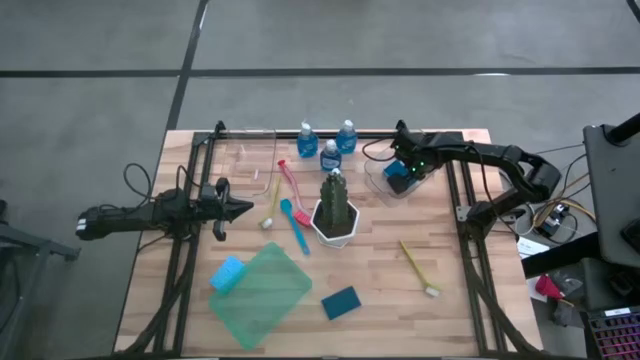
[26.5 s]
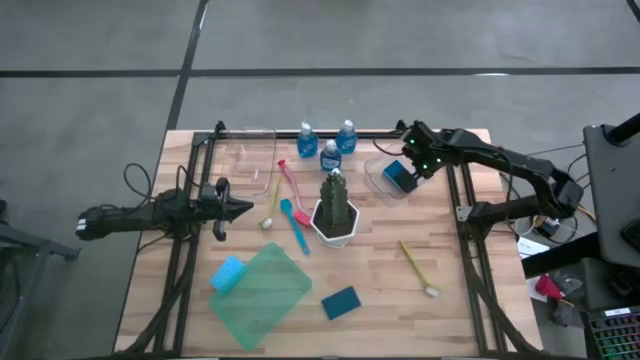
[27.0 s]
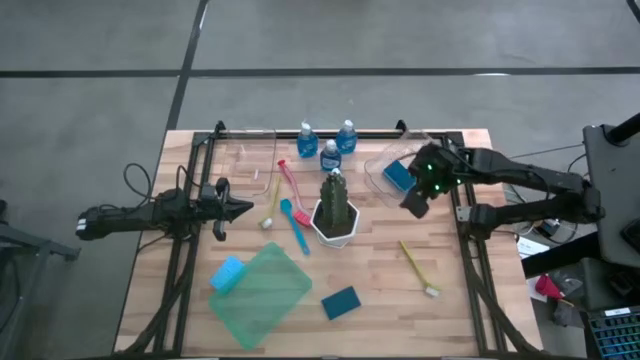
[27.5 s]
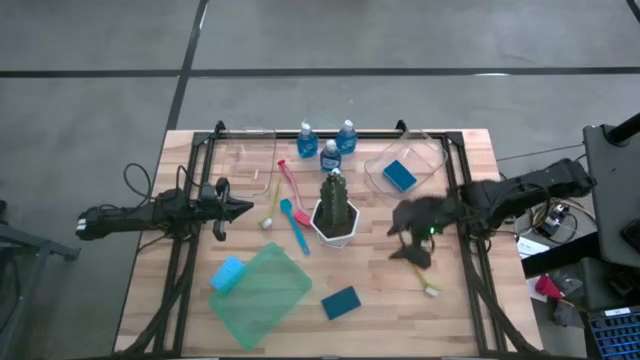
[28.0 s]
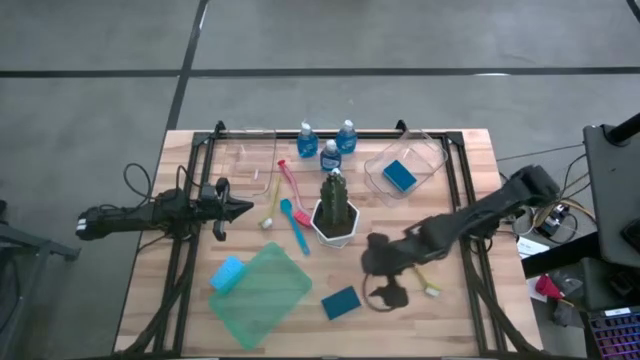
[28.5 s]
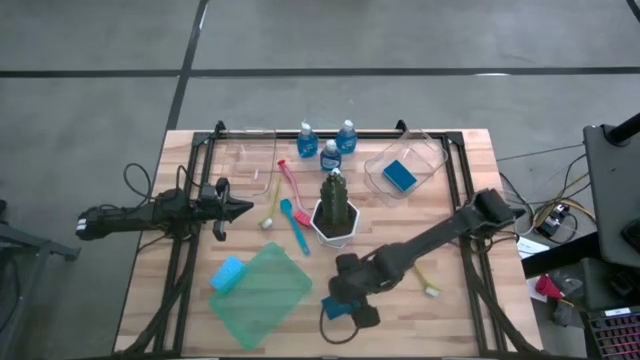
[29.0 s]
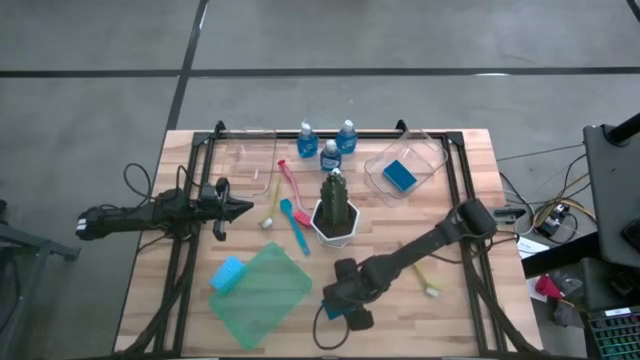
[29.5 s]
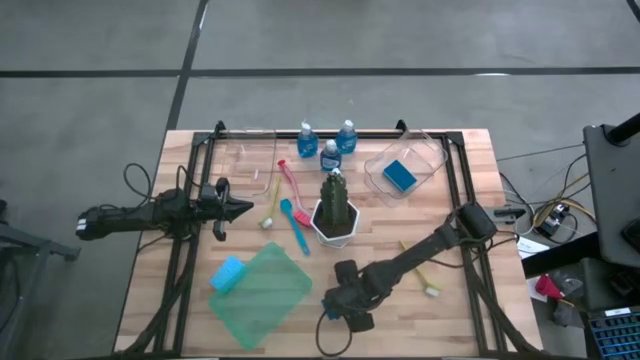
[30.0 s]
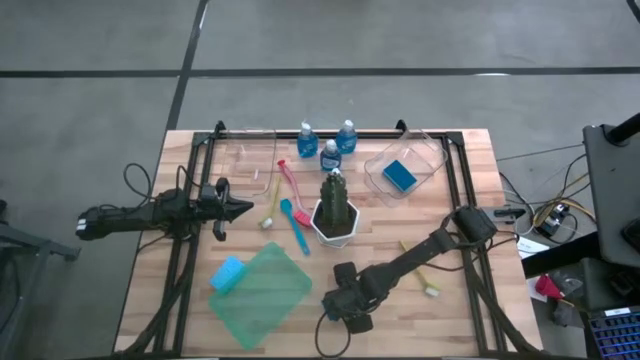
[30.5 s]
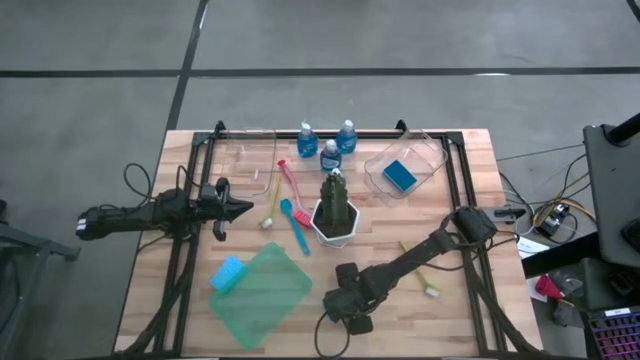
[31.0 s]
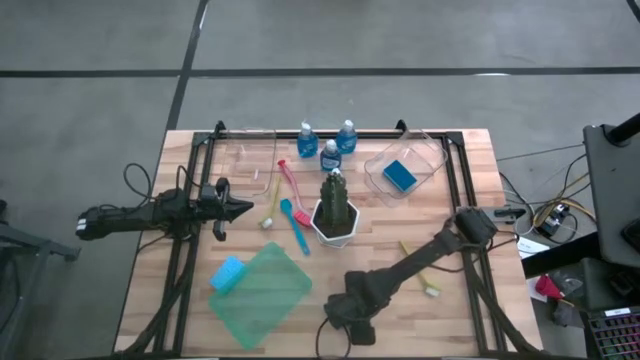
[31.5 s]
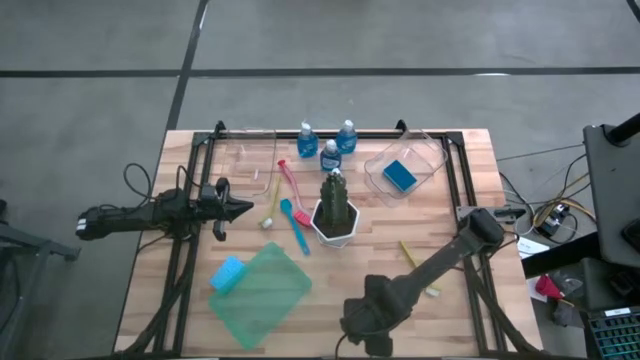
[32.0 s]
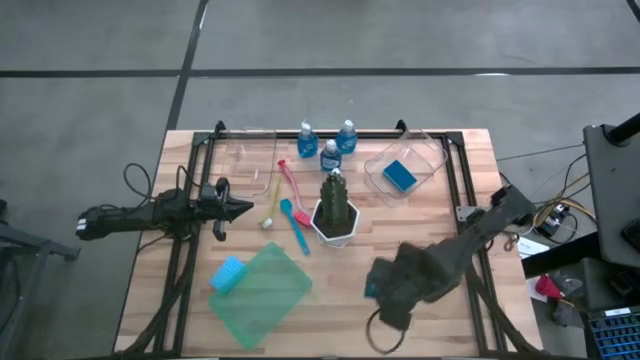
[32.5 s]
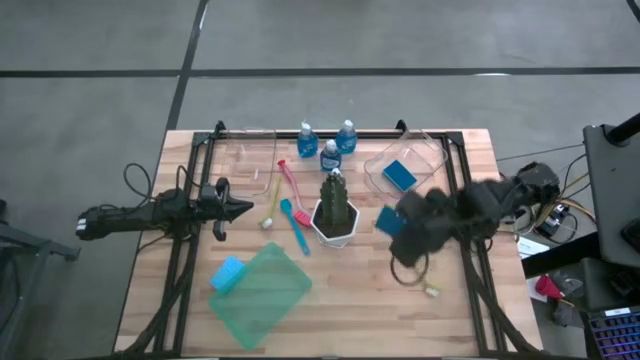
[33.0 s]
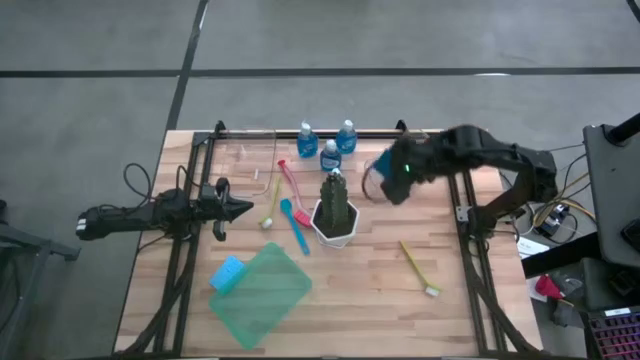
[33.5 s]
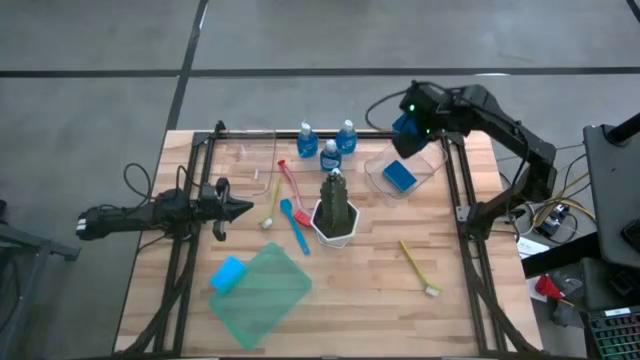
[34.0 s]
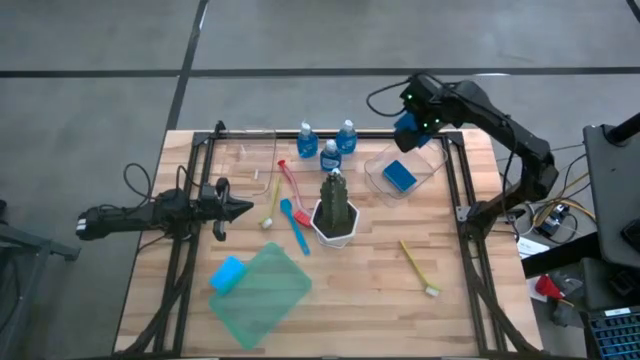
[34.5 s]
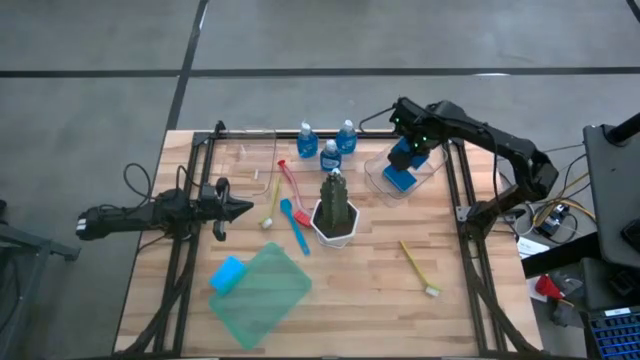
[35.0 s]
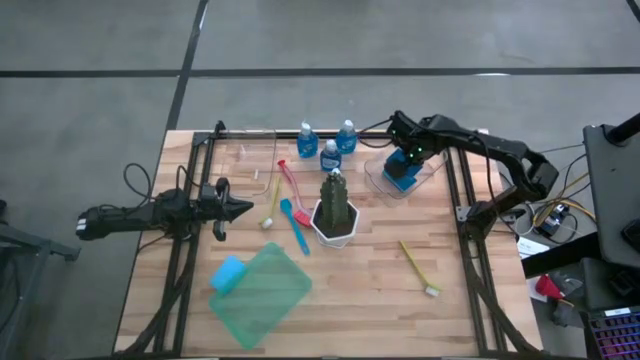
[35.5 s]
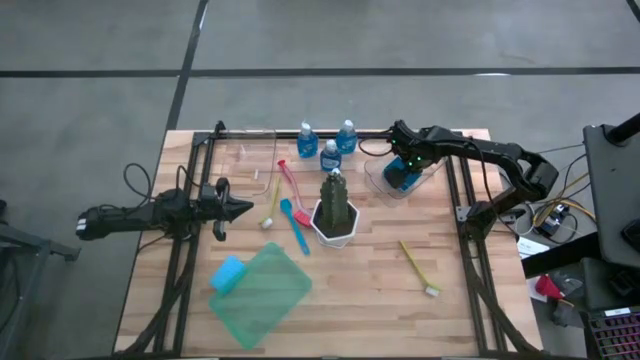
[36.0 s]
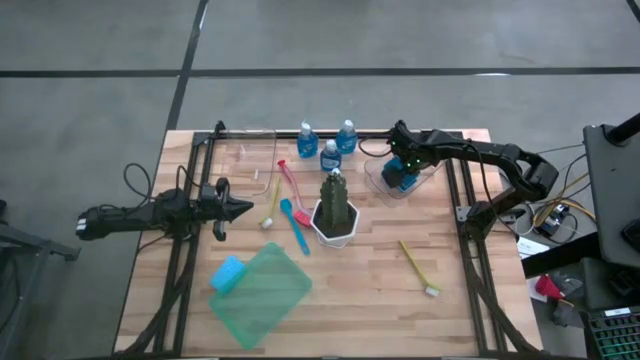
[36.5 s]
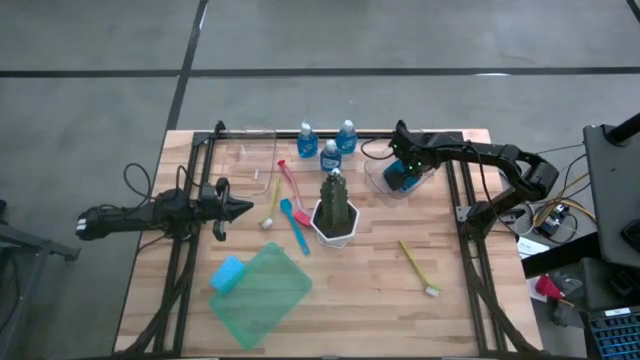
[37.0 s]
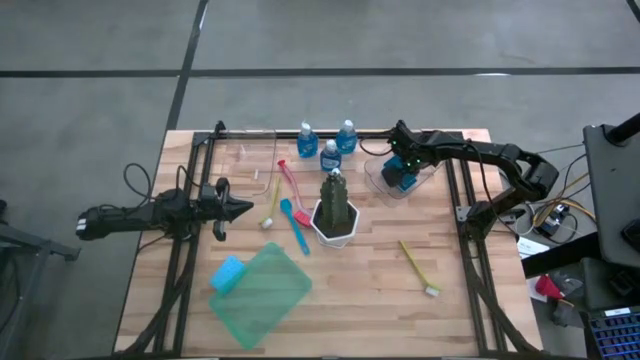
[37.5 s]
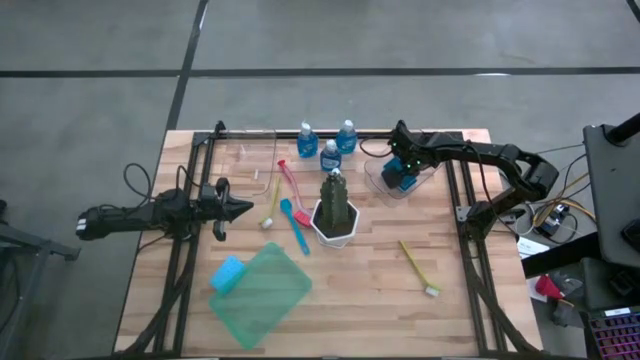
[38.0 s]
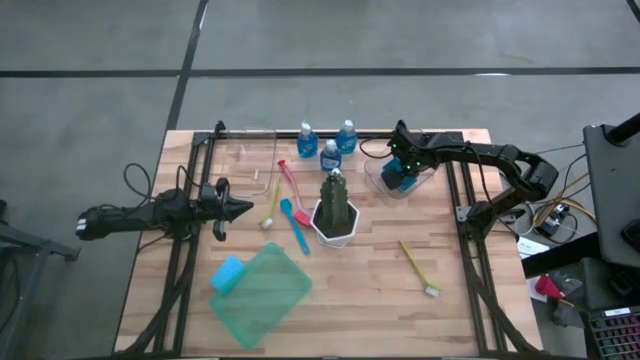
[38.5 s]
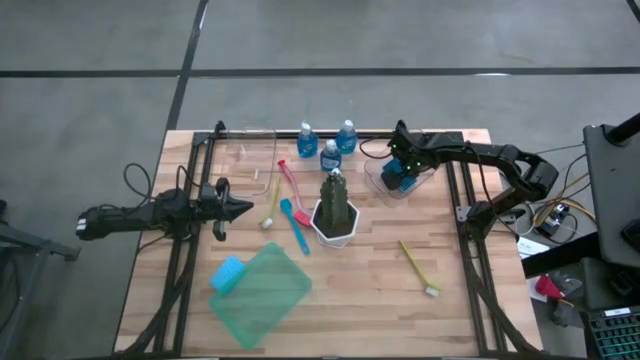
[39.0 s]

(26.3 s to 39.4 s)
Task: Pick & Place Kitchen Sink Supplies
Put the blue sponge into the right transparent bin

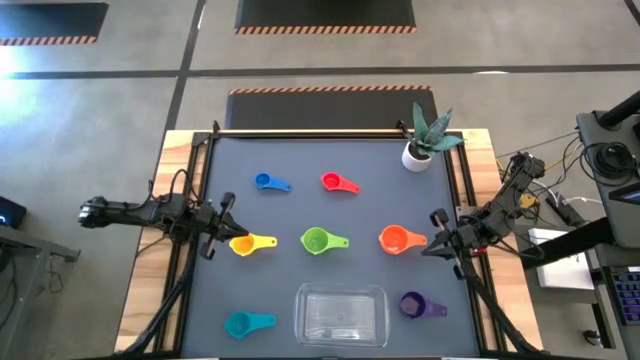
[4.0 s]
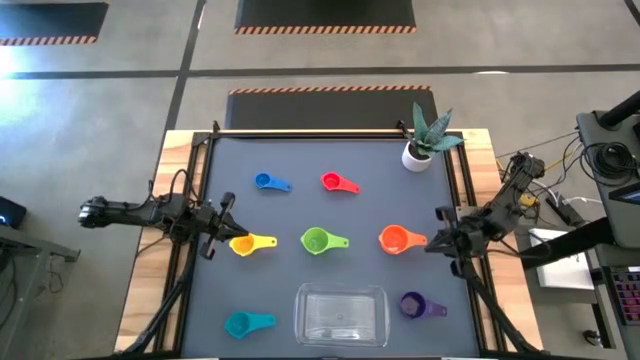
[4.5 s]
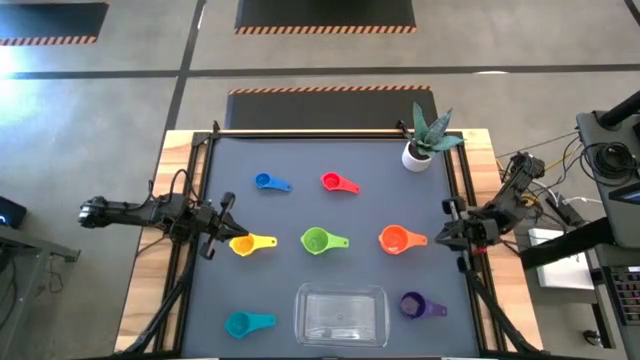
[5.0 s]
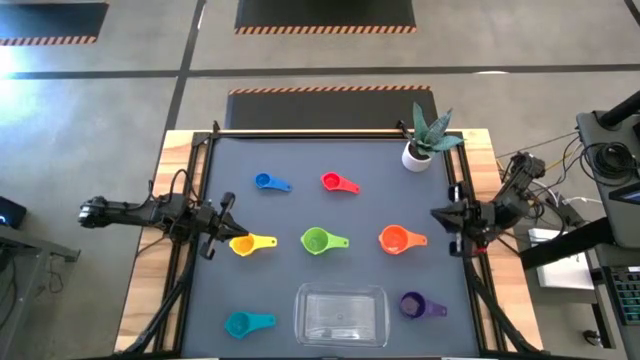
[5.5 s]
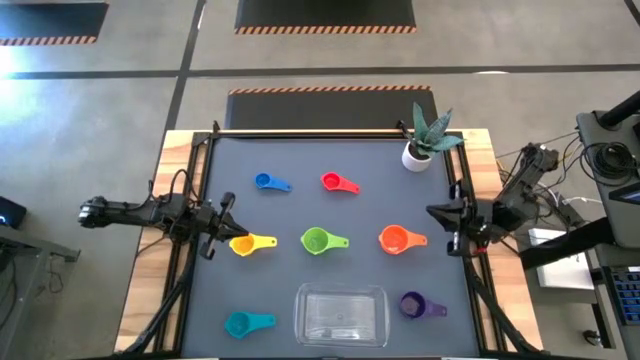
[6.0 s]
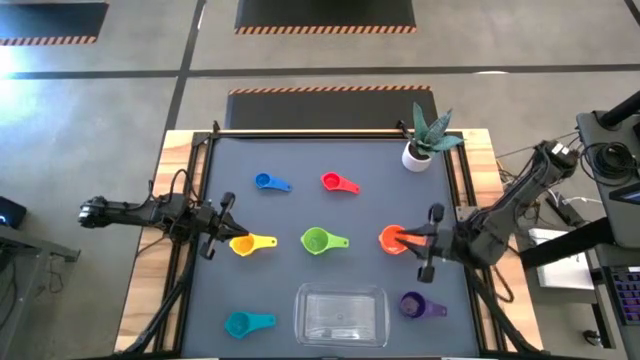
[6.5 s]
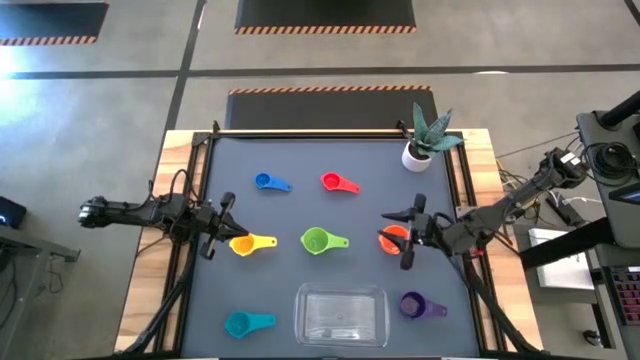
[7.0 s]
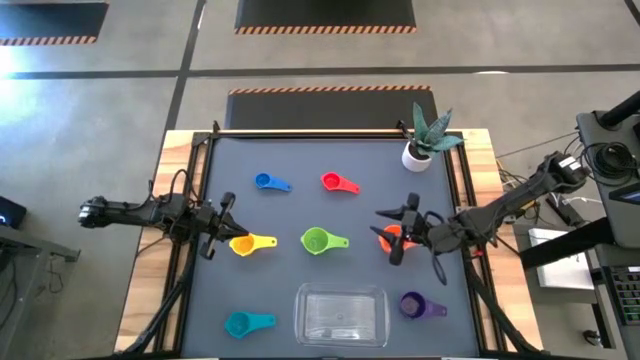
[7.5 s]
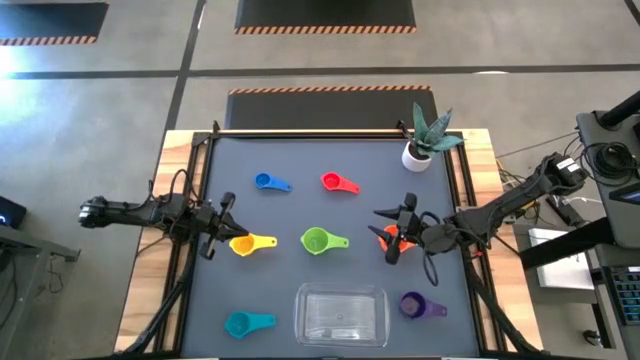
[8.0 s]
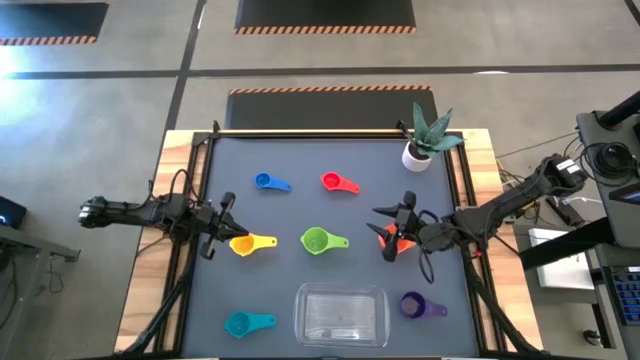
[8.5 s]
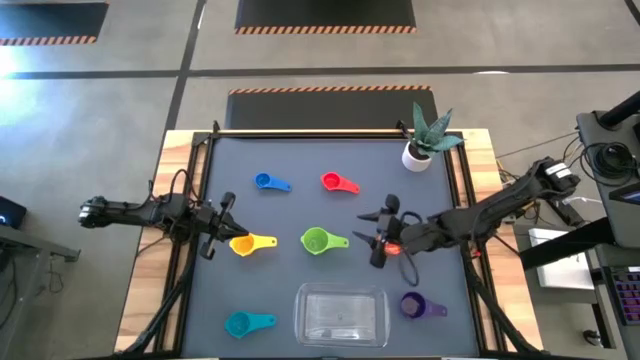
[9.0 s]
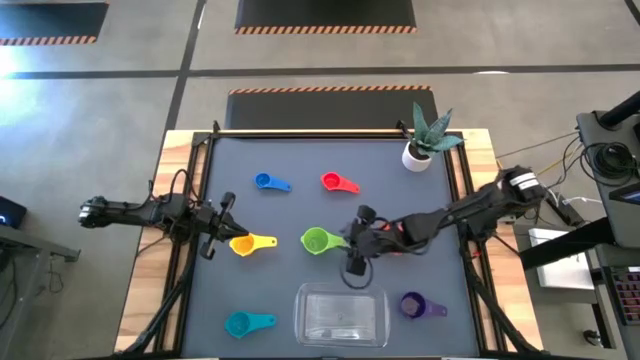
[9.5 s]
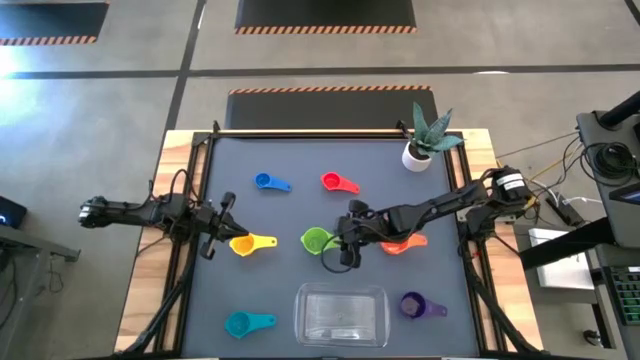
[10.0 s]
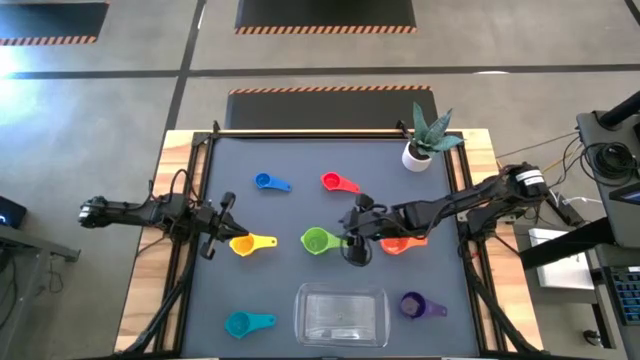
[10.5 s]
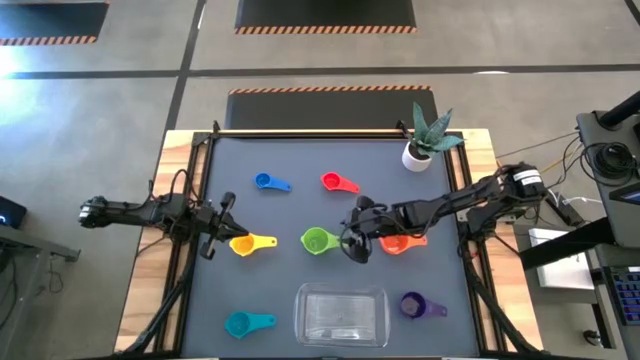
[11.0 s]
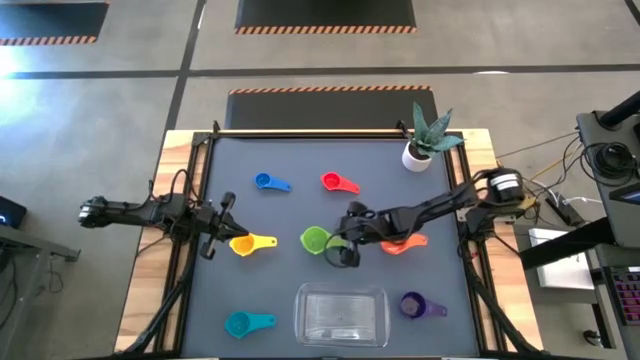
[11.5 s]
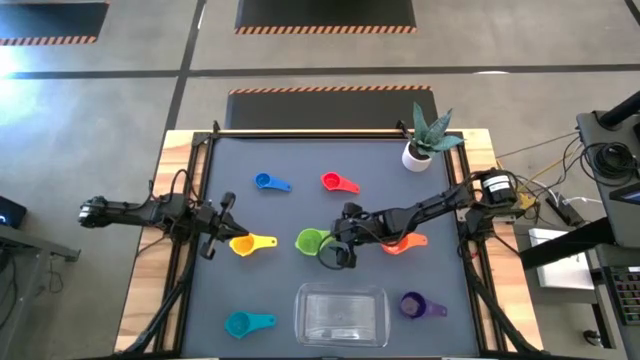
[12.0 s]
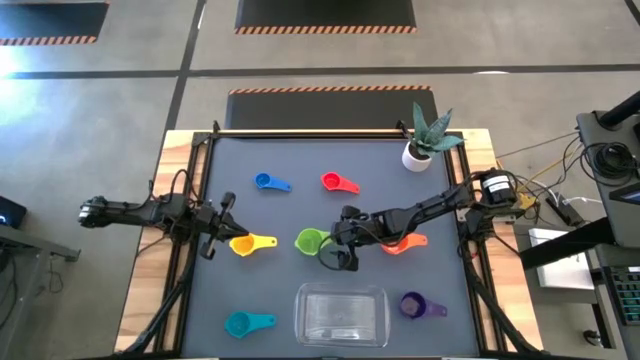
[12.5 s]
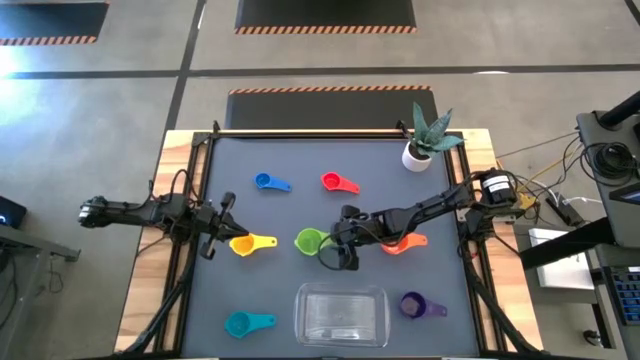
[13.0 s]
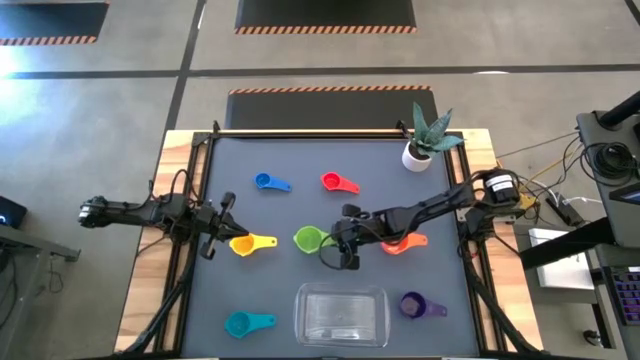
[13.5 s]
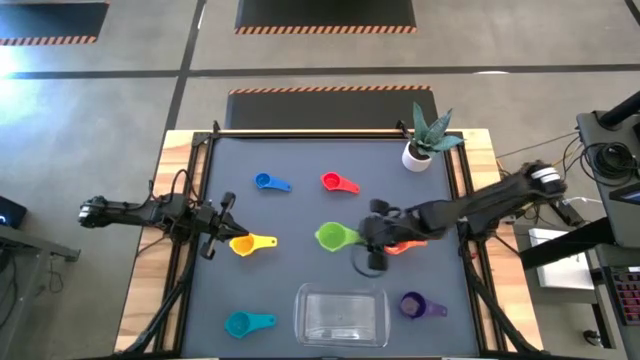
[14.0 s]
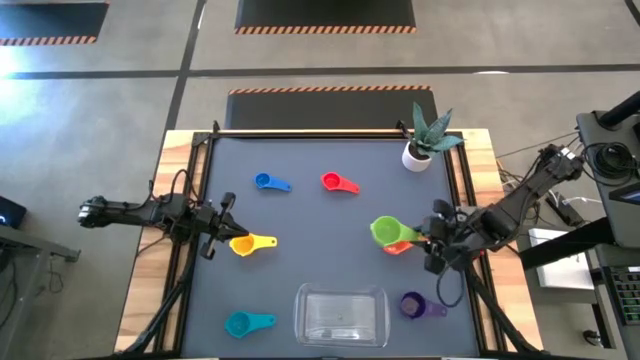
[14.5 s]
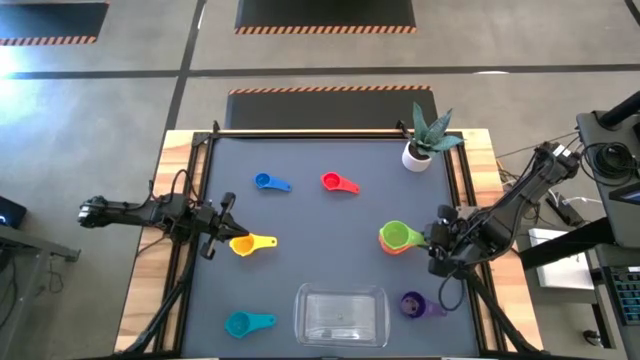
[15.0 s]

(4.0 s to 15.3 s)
Task: Nest measuring cups in basket
Stack the green measuring cup into the orange measuring cup
